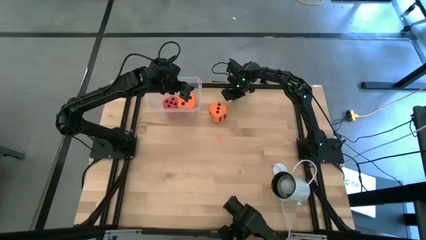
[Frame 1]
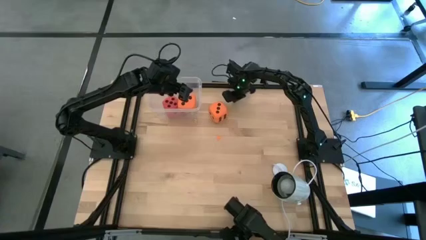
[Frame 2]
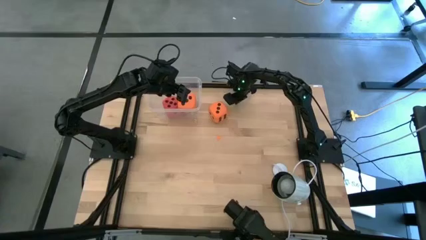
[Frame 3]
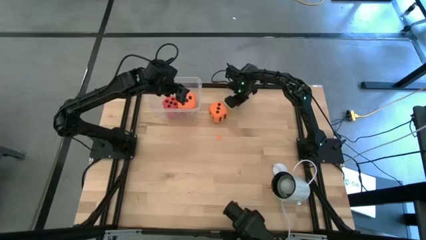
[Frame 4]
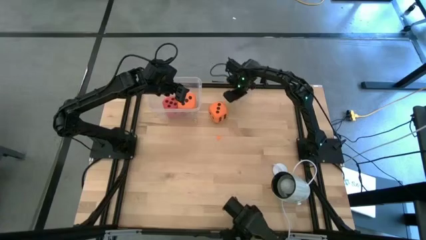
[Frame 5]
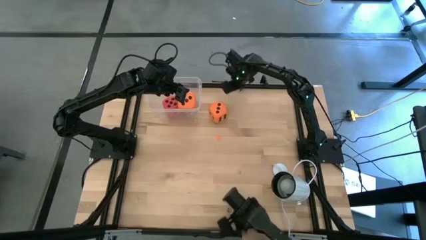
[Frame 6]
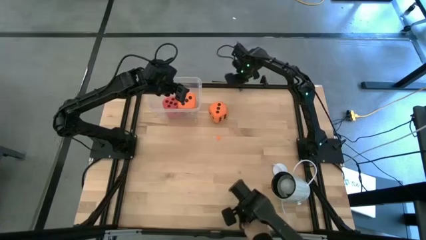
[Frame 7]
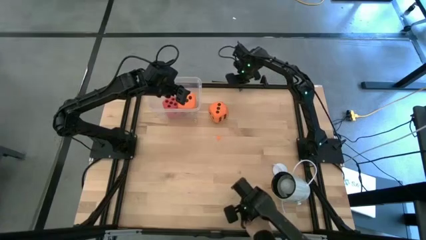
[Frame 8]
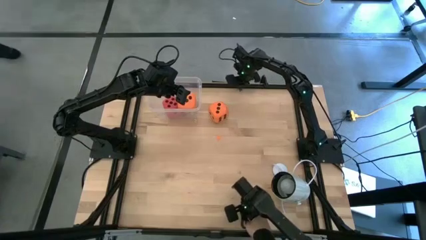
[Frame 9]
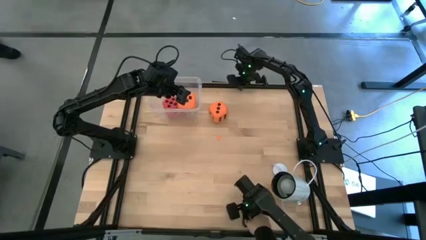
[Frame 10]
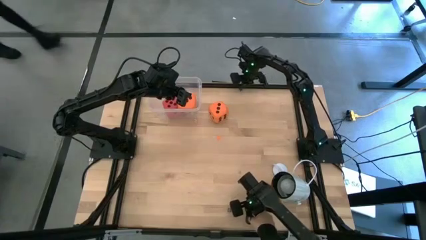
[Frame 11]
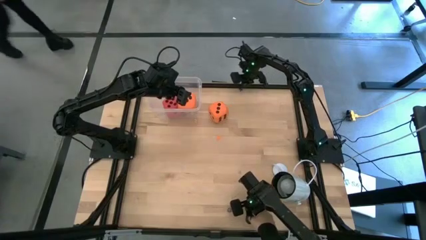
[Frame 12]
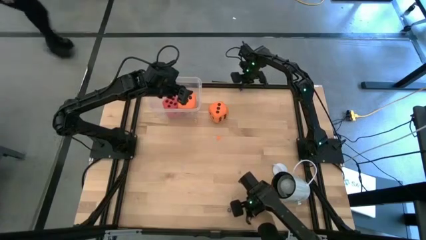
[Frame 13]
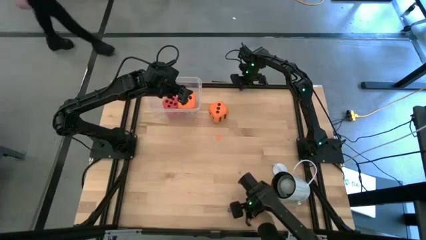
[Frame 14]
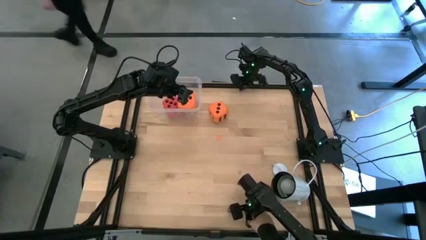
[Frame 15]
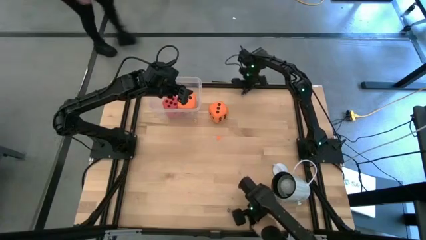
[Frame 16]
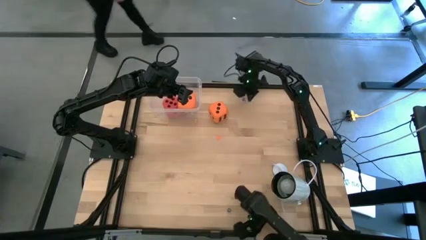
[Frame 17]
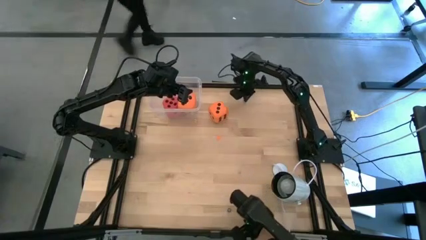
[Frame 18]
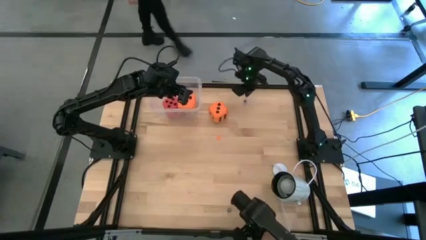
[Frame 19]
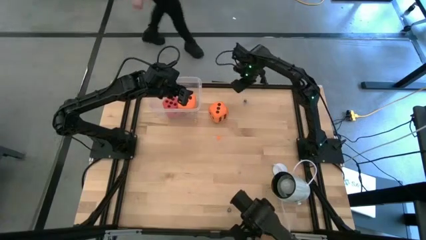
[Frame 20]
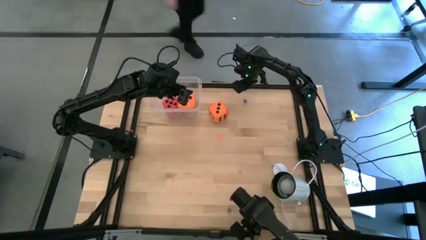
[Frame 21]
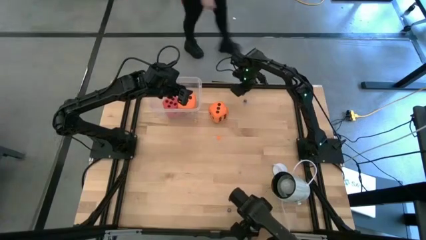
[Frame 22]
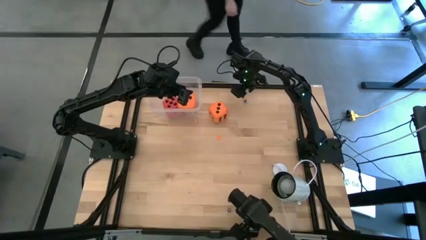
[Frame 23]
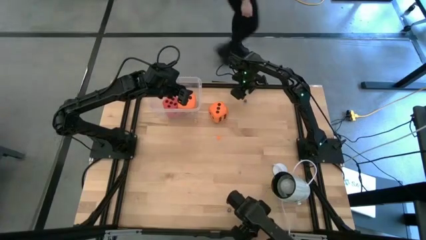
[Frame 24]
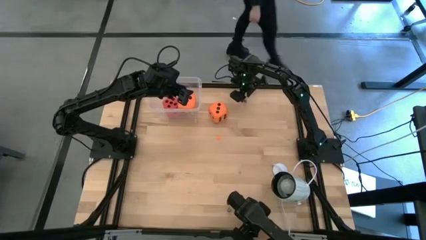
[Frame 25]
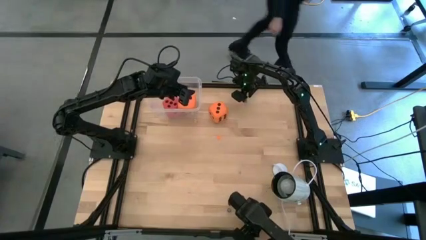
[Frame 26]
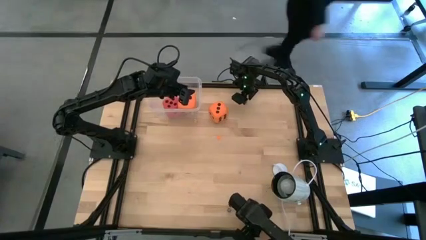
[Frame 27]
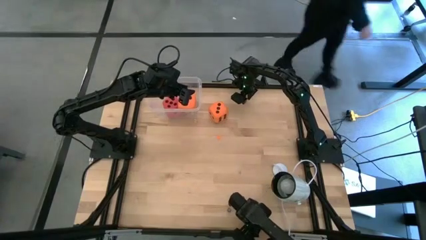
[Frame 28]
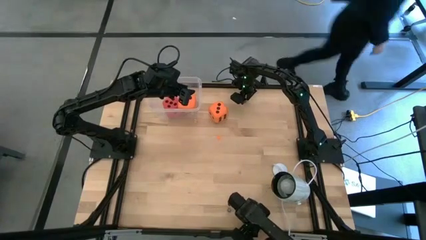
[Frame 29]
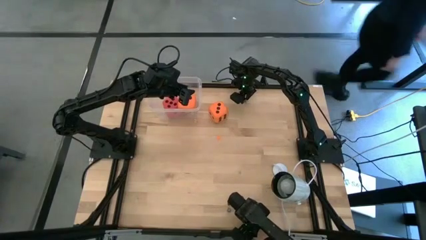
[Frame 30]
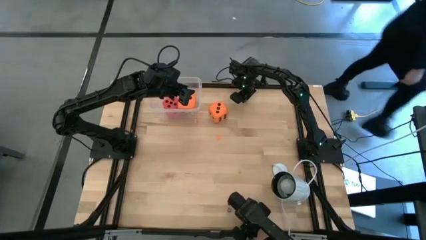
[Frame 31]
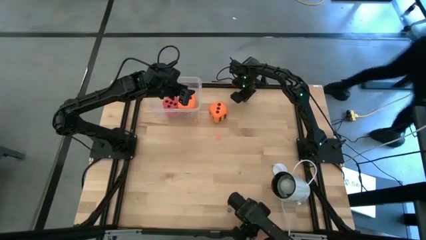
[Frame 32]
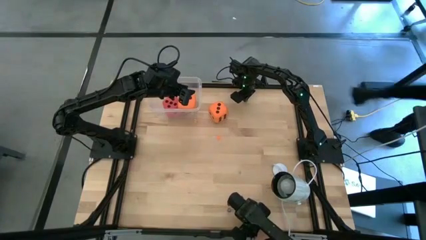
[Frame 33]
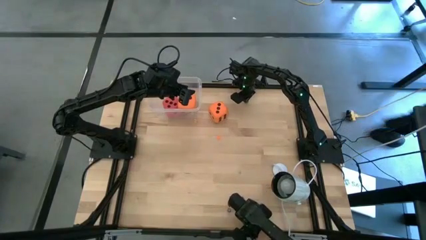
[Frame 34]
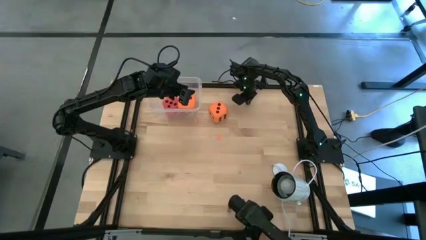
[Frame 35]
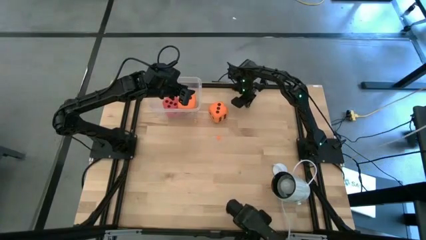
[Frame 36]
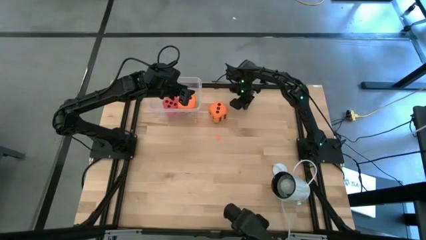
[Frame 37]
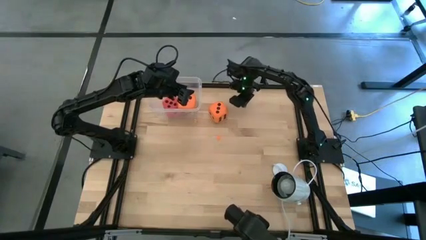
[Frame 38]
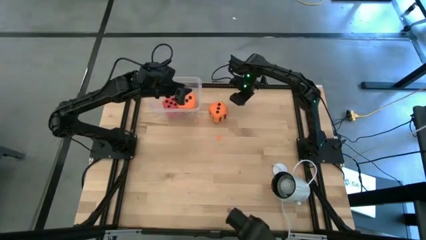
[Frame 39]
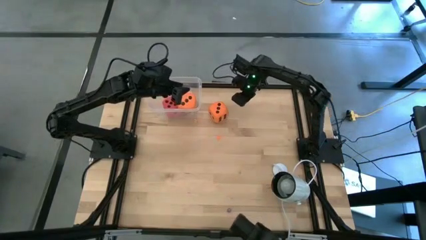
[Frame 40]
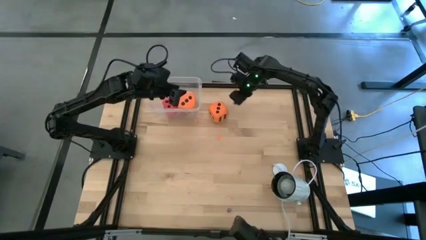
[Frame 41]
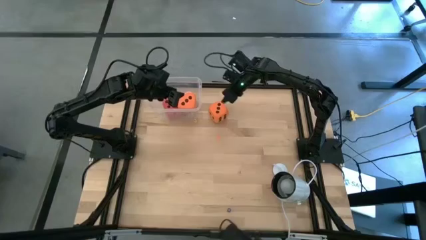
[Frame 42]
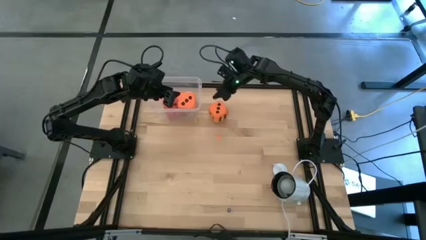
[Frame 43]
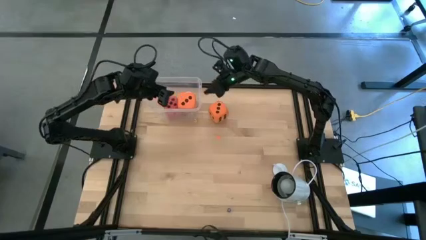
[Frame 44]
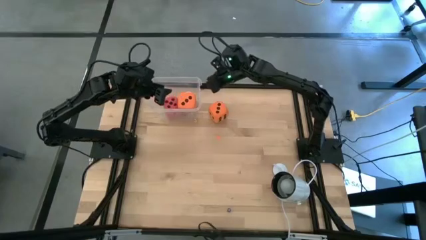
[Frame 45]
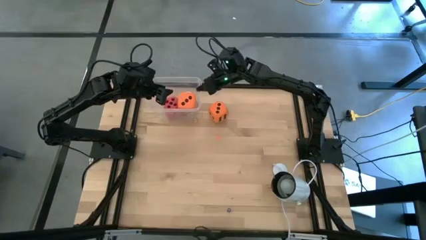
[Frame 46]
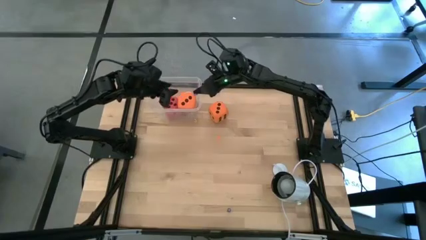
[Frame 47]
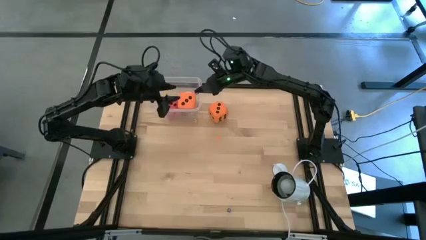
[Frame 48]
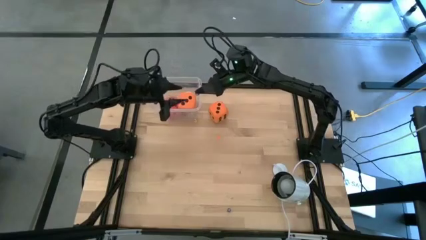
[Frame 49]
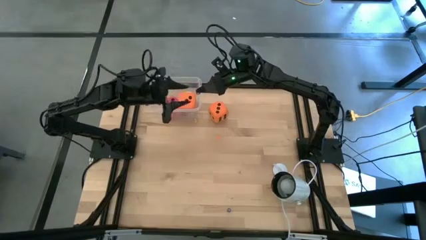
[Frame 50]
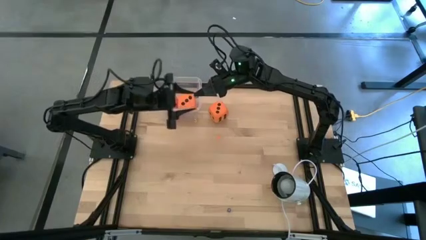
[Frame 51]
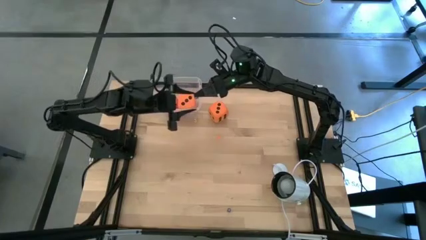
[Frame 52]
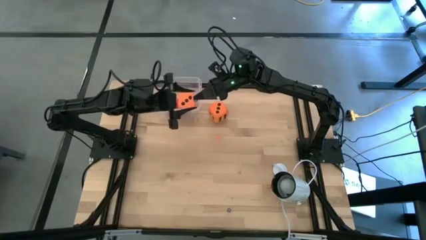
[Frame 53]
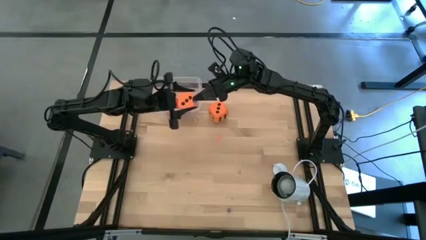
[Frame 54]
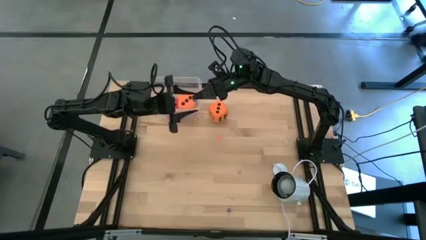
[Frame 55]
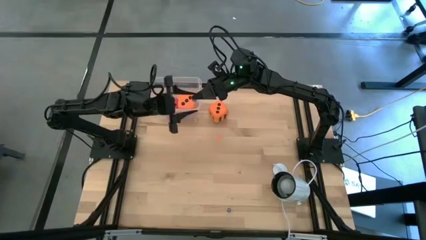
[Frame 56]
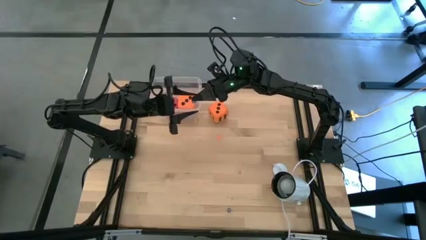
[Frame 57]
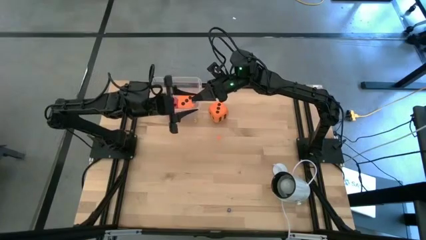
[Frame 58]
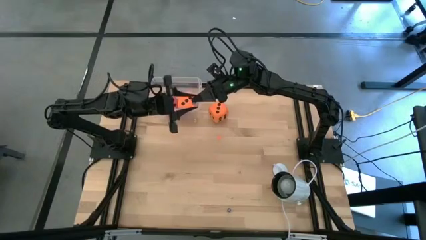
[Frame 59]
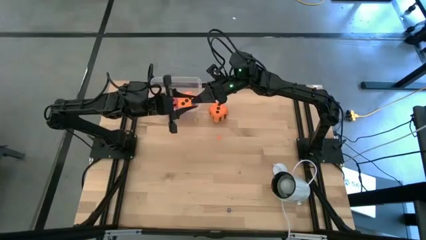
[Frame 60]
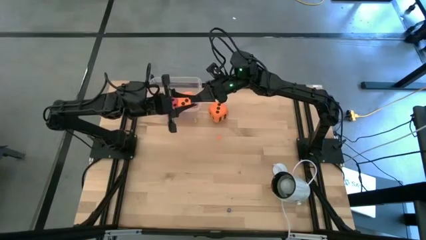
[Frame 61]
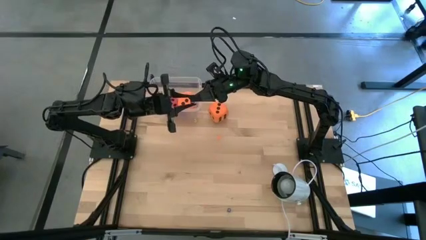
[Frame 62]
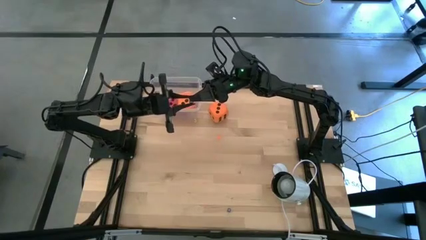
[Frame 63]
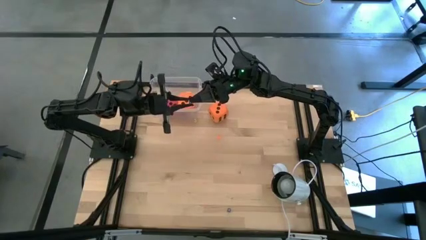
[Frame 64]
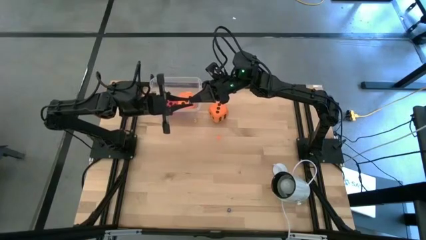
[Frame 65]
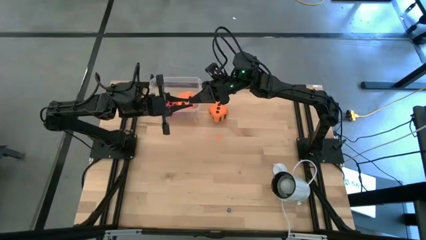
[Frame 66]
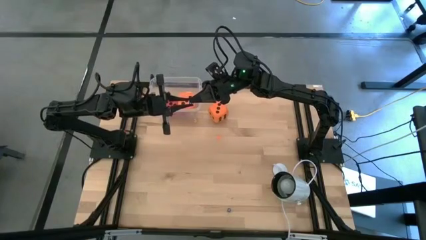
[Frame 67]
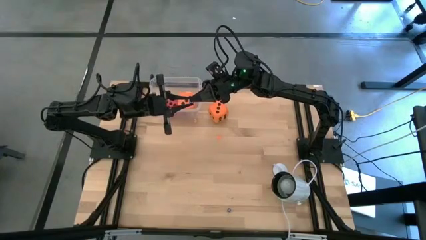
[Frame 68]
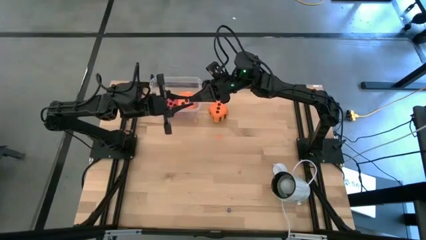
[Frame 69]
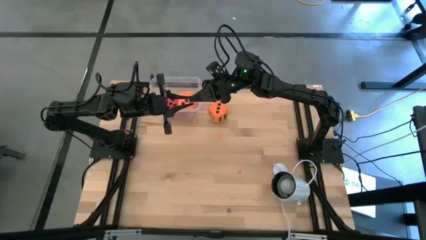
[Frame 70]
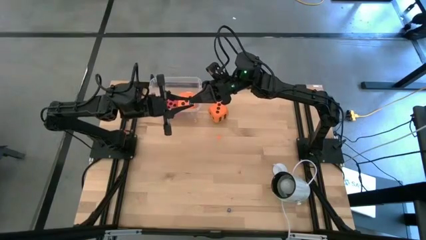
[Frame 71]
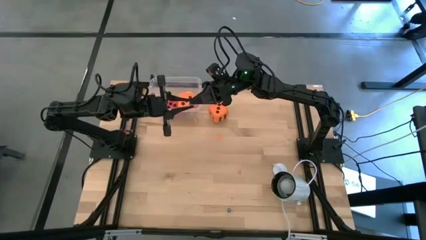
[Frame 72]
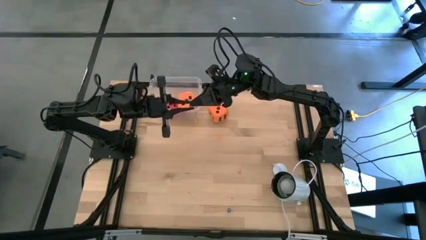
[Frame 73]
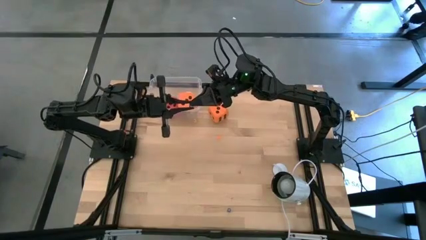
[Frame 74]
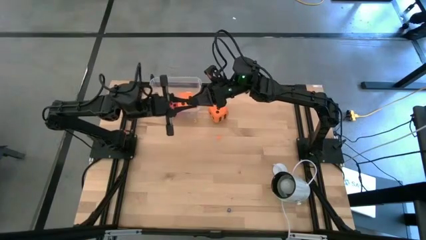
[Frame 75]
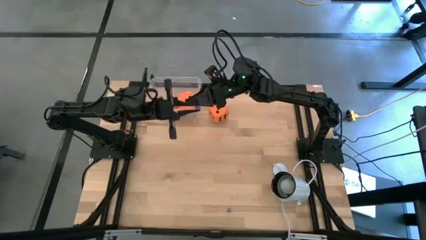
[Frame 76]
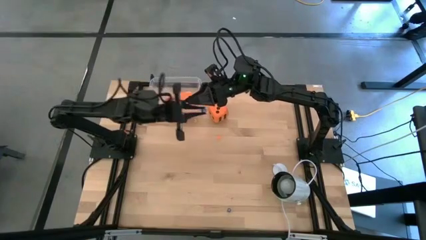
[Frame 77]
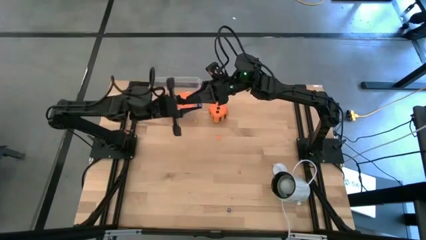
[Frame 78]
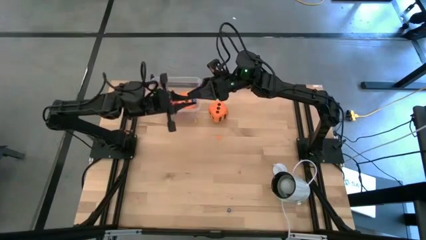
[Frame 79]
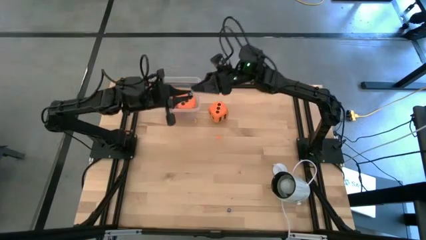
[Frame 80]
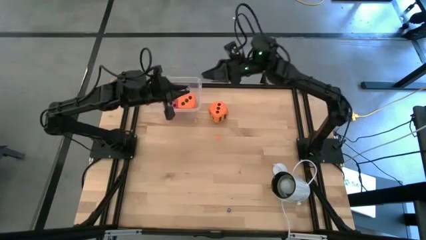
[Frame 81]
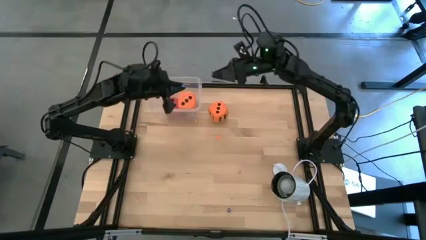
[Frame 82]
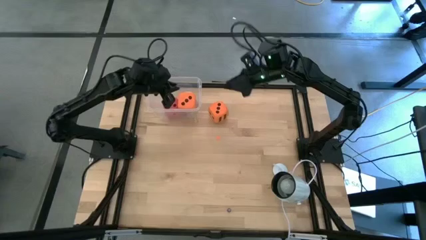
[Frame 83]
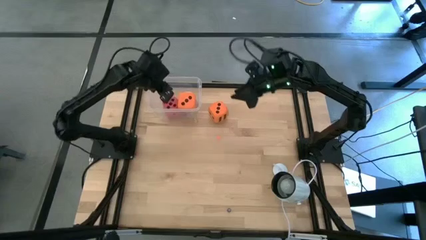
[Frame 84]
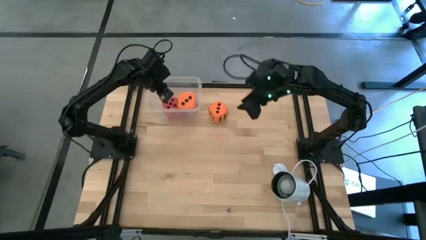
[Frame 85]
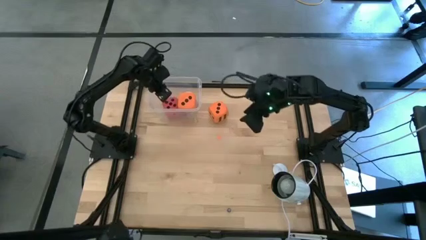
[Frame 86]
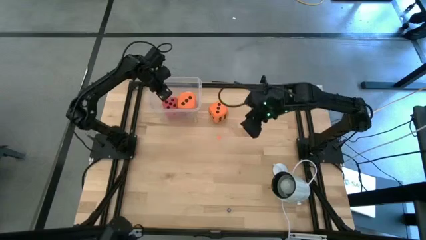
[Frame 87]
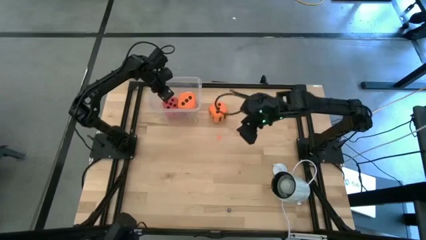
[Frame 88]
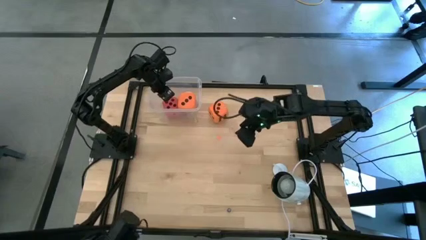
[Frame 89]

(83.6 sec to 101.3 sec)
Task: Pick & Place Dice
Put the small top blue die into the transparent bin
